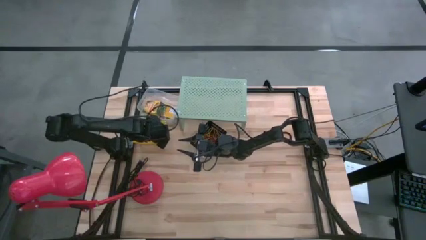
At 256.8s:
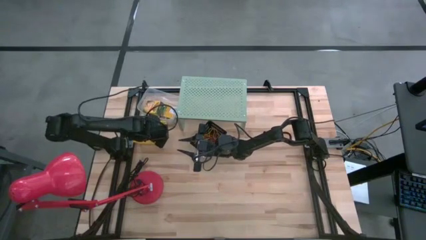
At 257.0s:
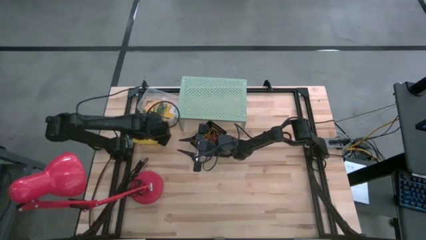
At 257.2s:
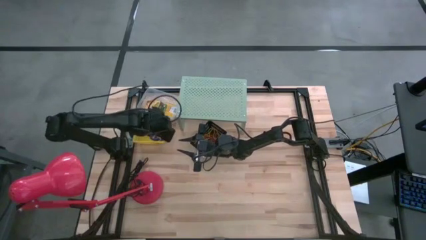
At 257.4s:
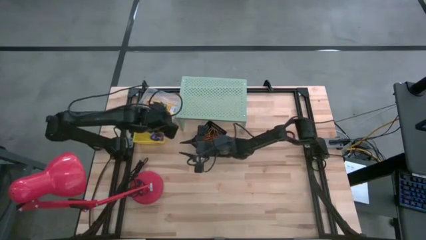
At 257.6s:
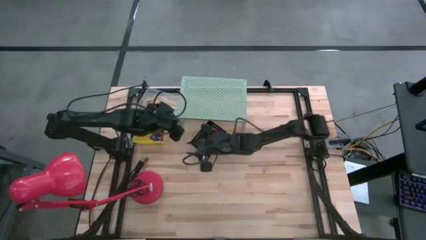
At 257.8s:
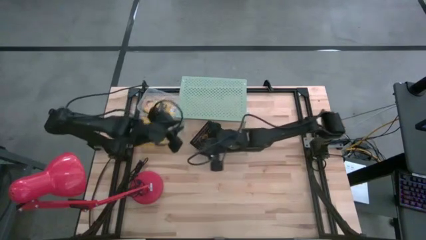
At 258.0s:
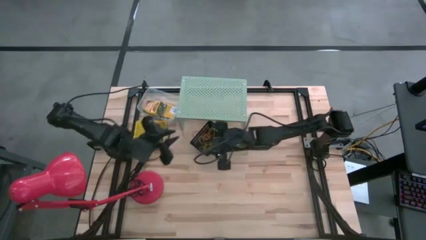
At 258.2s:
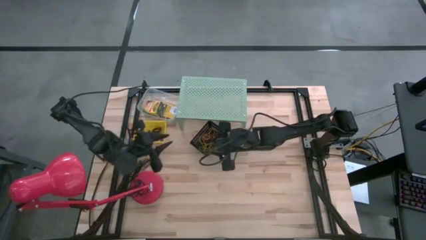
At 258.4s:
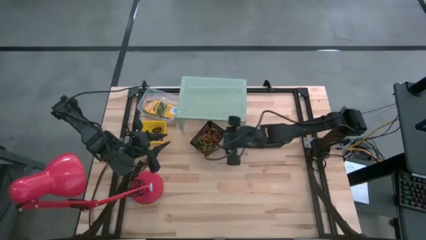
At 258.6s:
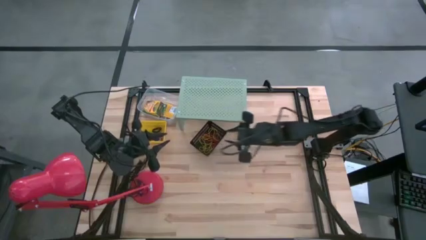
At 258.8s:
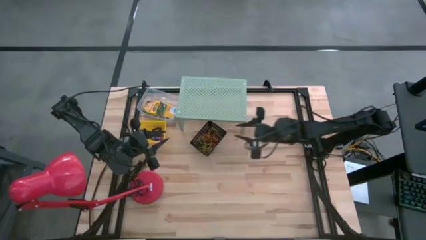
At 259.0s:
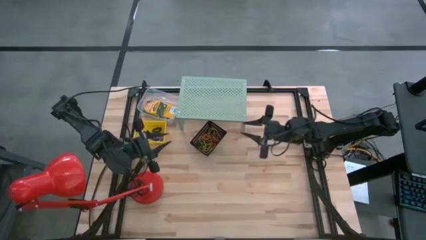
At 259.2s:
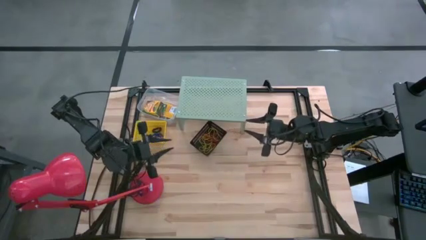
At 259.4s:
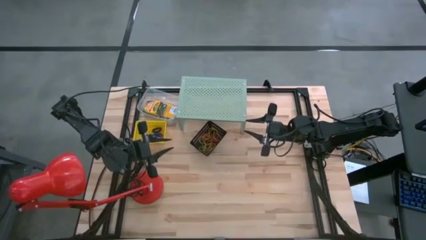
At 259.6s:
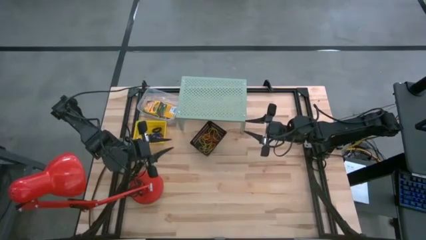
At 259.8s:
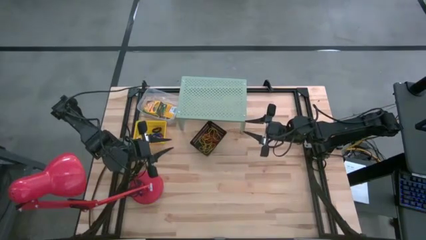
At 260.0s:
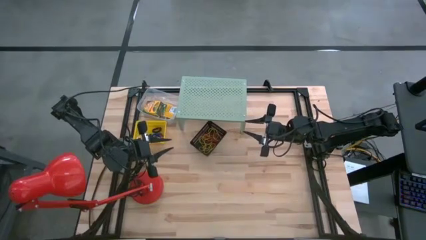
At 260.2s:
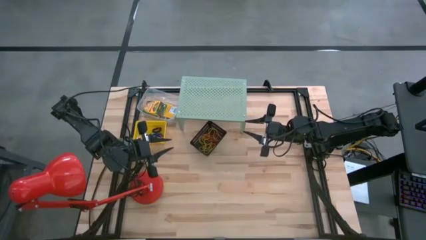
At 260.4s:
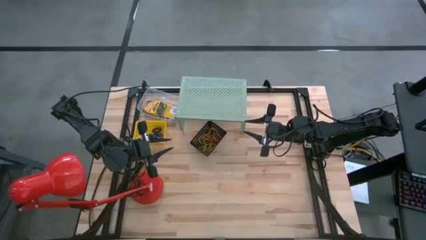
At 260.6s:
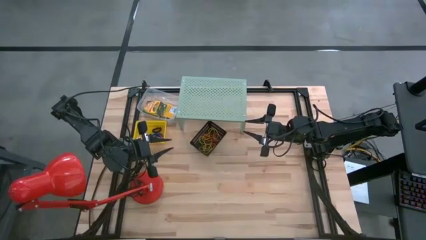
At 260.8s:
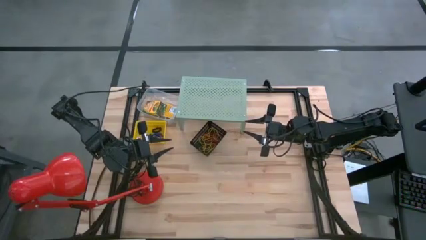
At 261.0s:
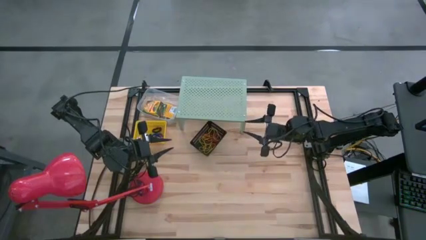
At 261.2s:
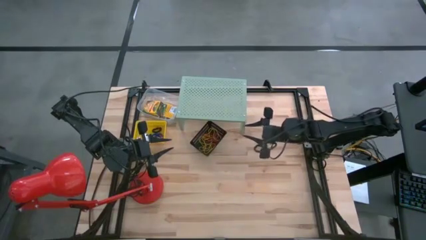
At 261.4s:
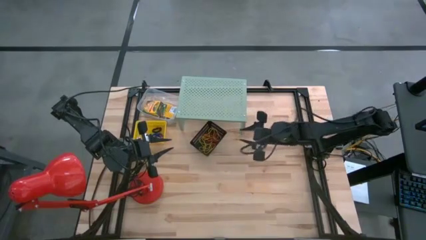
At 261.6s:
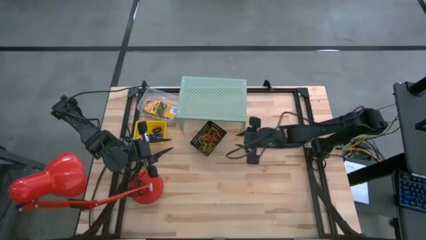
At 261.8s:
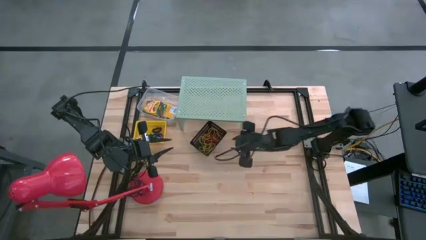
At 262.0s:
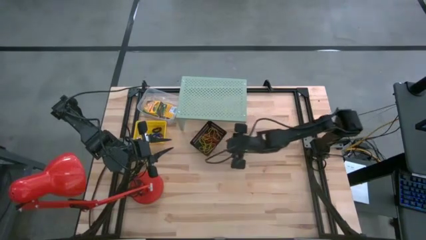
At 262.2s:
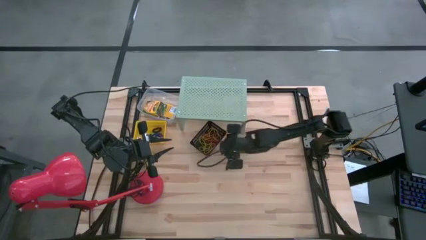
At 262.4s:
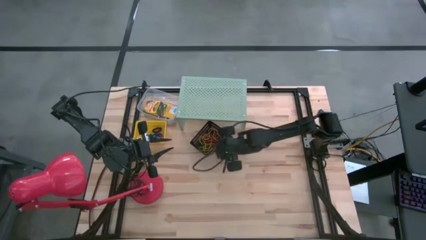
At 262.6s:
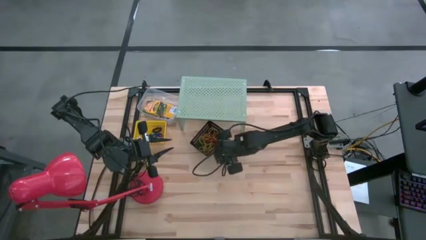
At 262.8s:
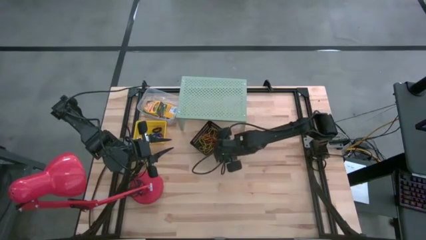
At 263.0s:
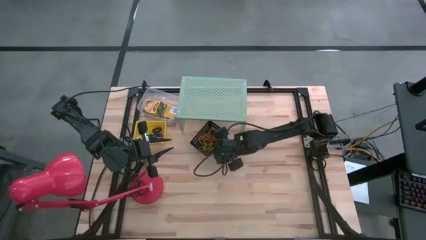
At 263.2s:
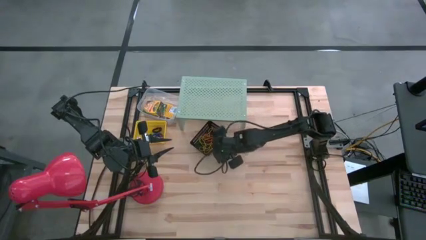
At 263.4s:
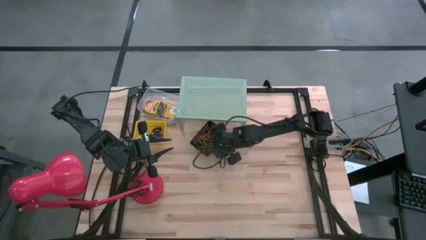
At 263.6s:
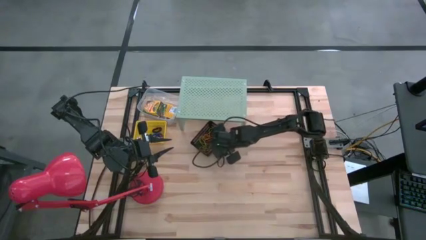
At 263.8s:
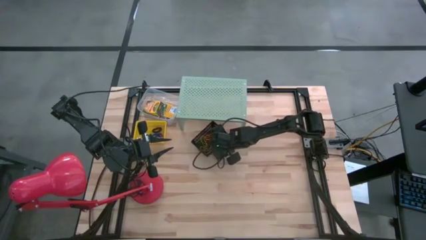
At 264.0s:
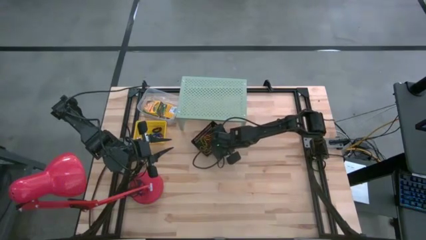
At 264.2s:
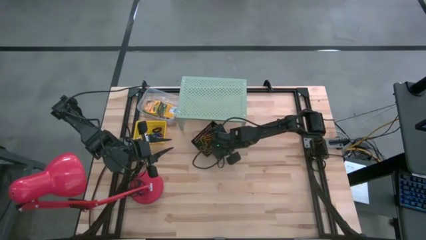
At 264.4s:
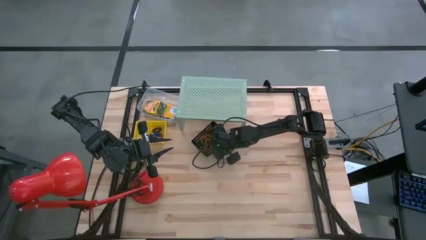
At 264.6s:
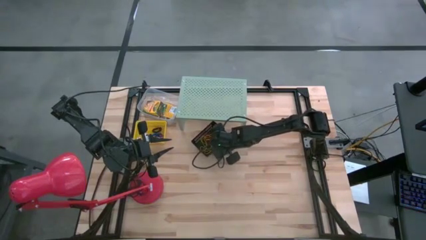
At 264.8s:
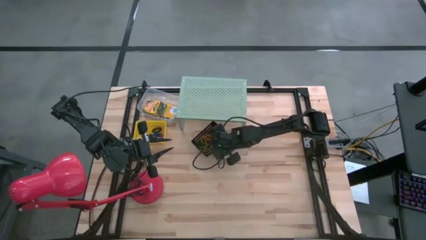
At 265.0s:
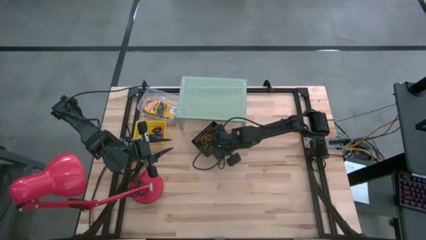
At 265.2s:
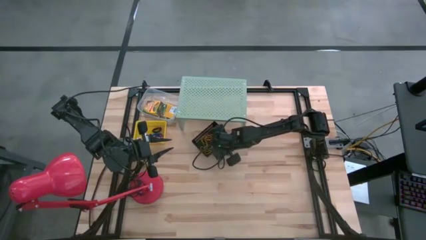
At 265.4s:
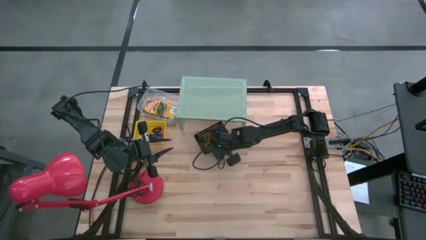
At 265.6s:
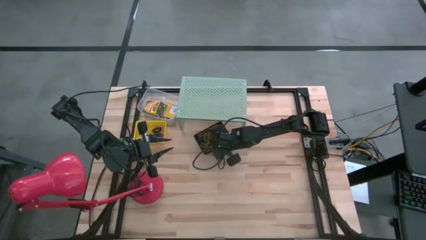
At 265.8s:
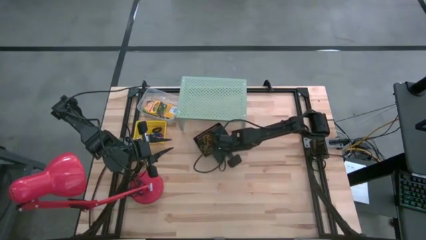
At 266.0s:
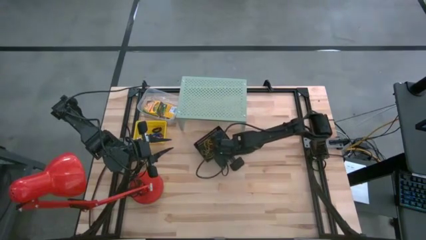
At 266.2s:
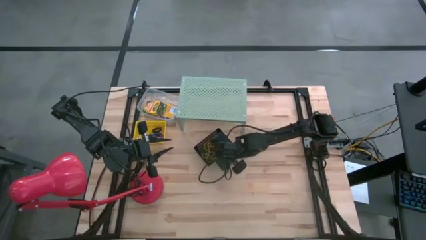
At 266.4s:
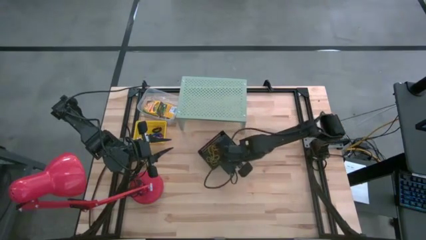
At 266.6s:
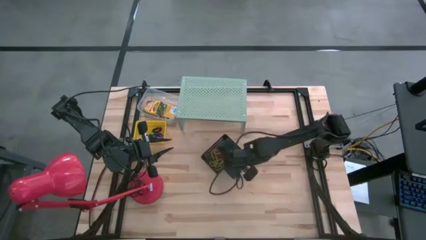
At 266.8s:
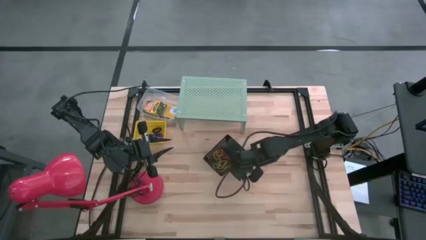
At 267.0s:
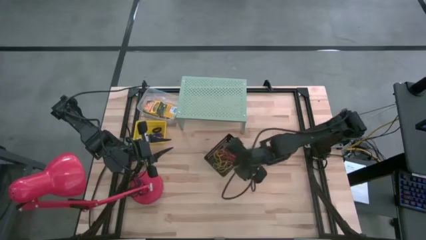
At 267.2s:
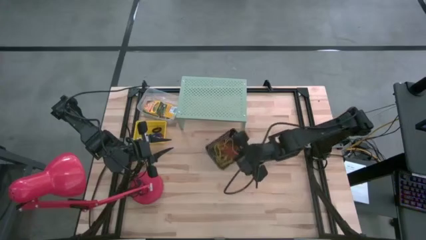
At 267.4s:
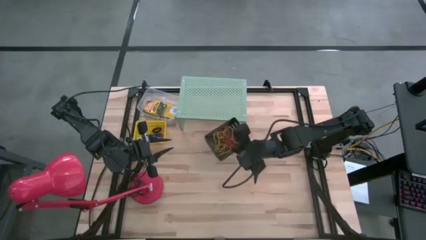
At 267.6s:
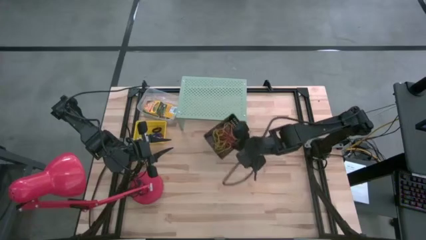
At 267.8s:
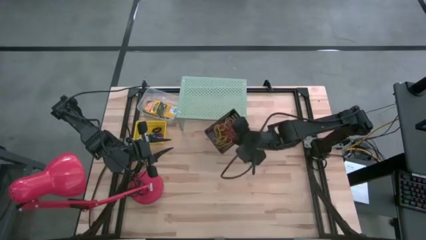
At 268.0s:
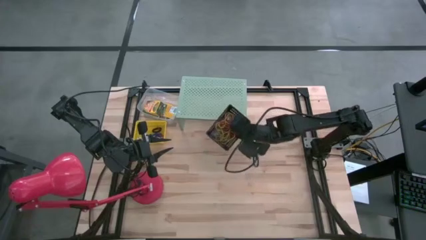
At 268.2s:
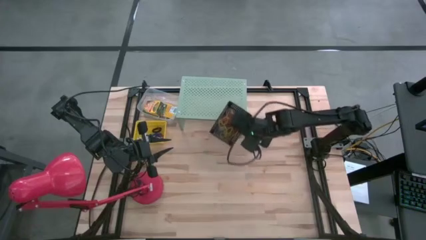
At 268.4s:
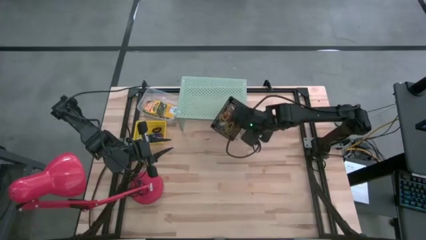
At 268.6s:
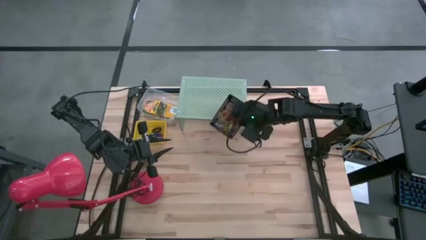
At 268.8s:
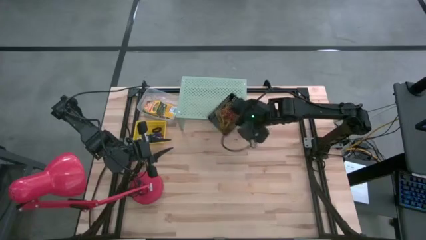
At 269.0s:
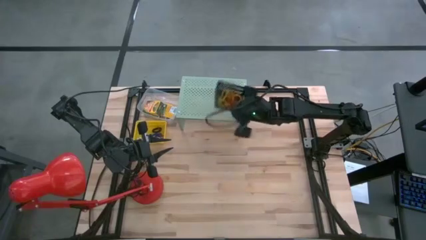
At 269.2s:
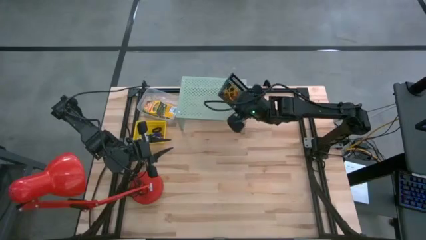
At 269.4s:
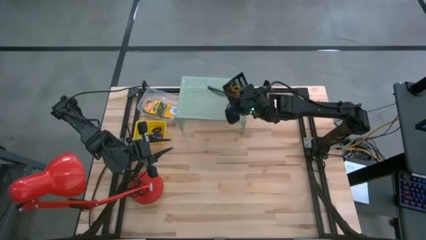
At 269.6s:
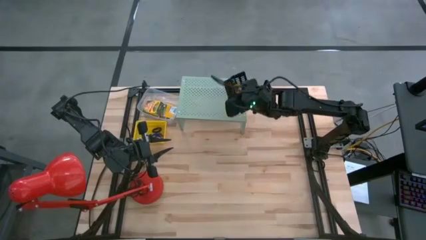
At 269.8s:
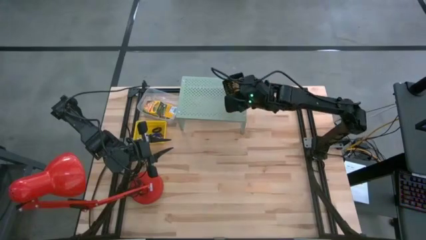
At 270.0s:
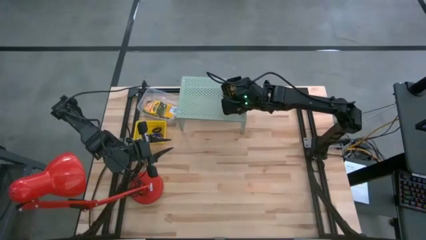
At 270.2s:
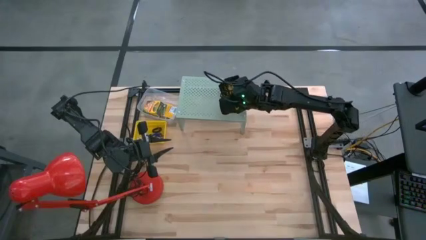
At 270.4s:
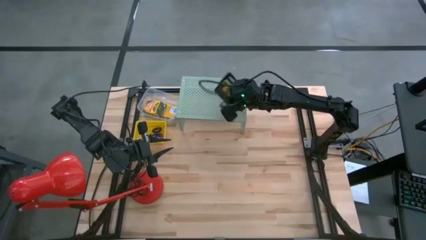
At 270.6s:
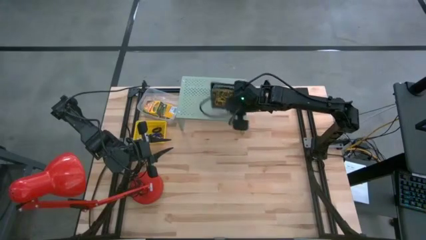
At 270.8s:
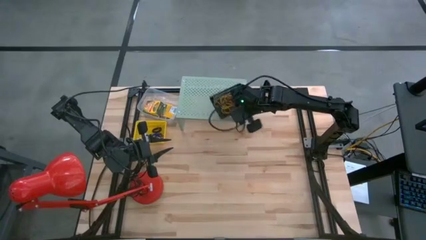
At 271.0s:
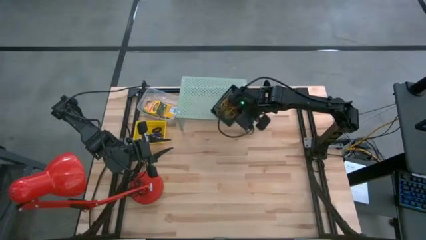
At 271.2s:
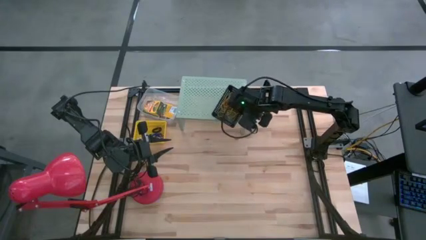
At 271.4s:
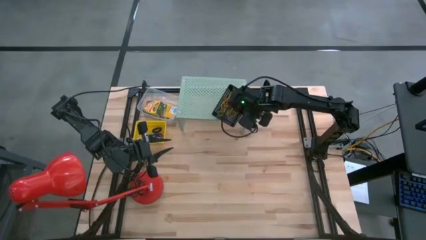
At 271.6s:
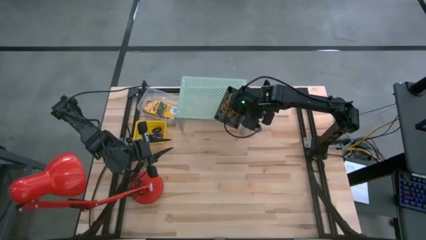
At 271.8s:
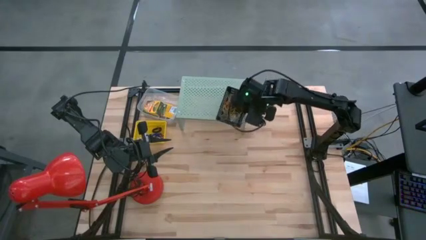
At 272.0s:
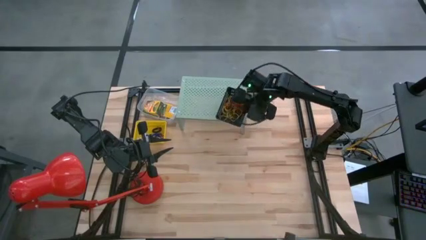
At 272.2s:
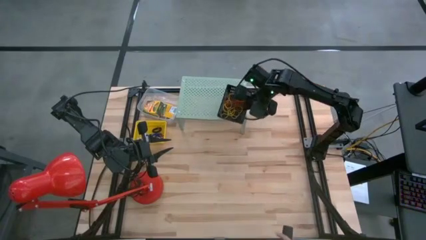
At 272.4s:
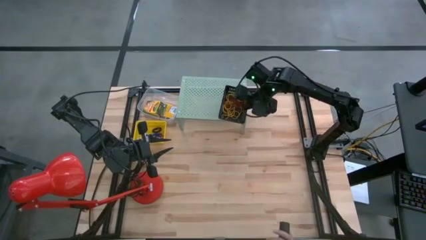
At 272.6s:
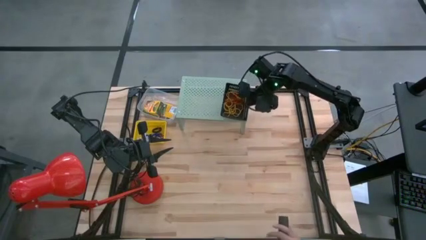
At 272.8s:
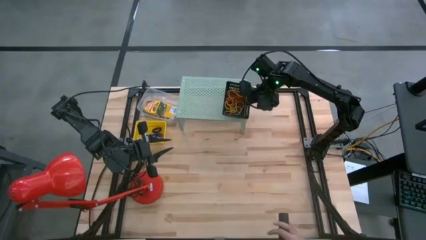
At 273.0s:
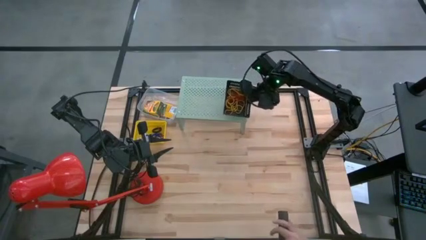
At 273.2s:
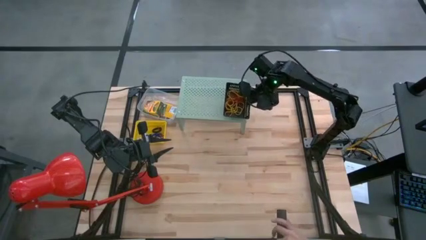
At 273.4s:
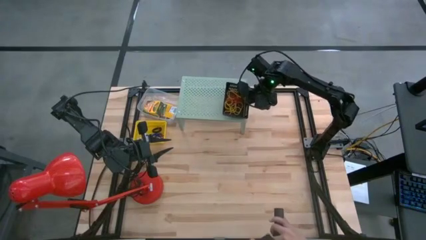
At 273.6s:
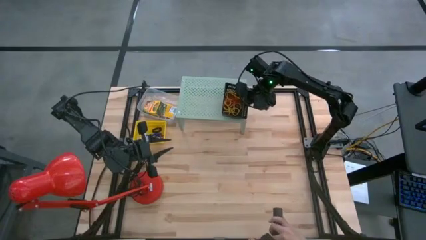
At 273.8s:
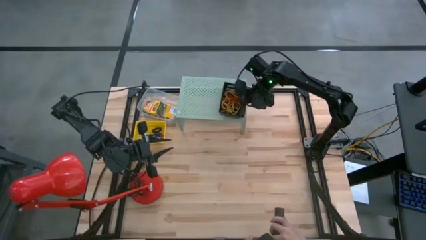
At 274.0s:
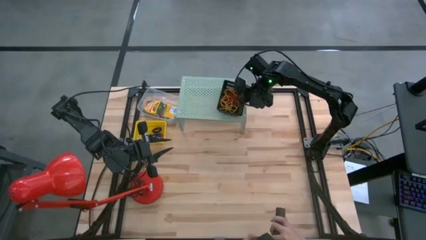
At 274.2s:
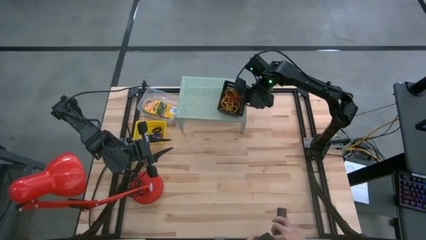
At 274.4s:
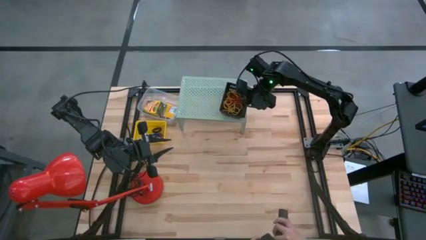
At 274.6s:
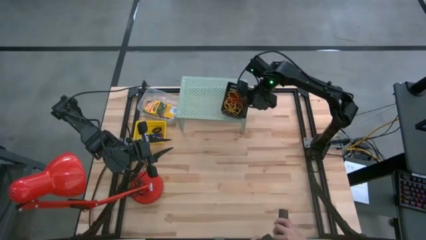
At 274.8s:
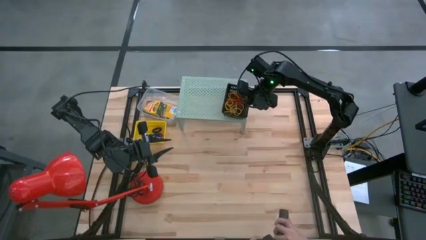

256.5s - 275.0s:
Task: Pick & Place Office Desk Supplies
Put the black bin on the shelf
